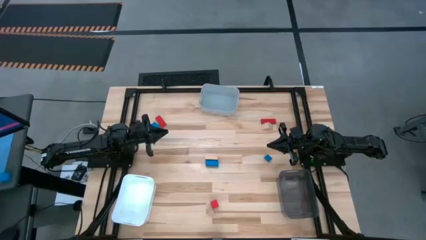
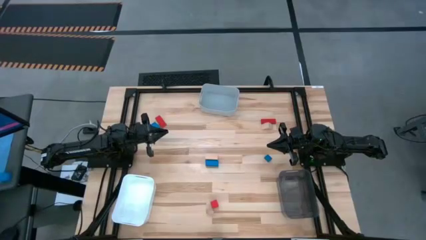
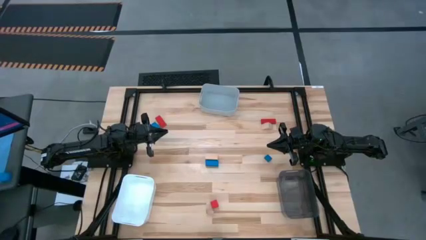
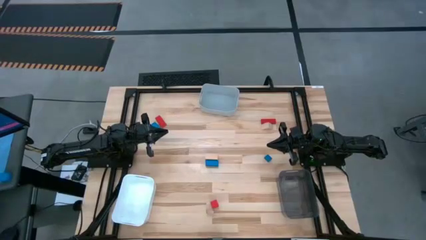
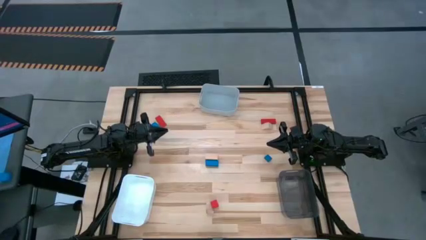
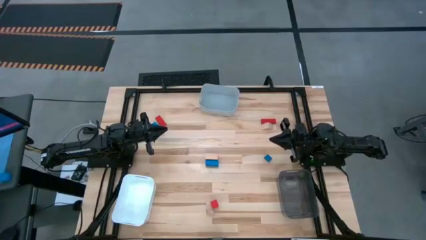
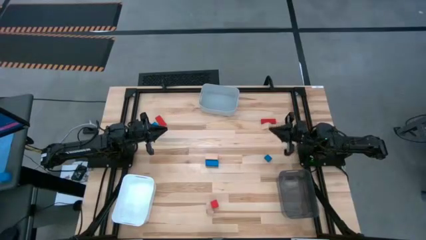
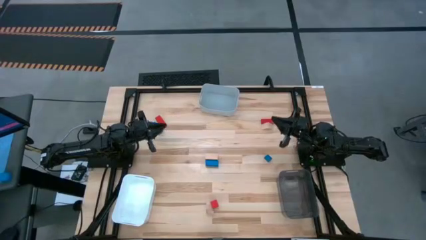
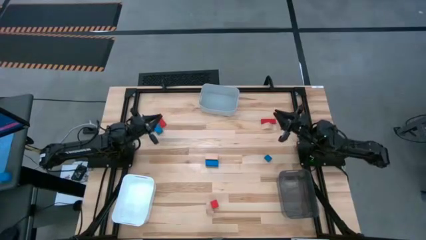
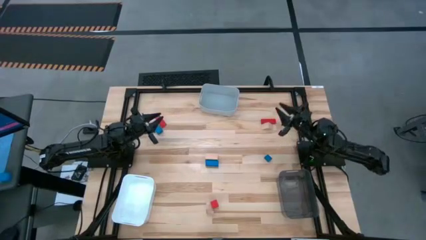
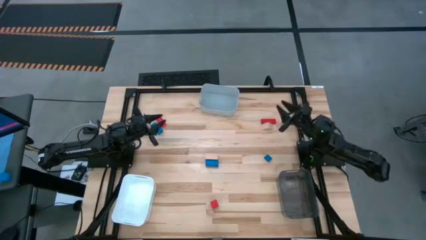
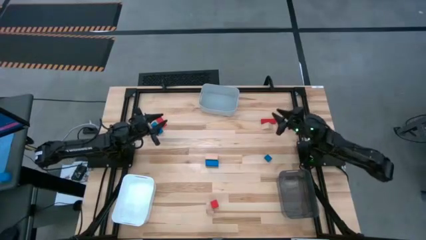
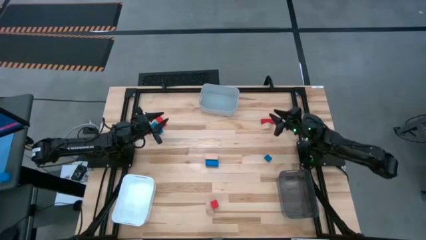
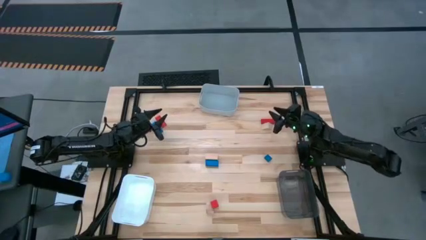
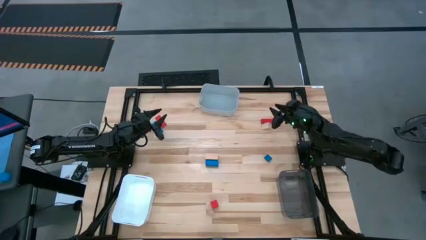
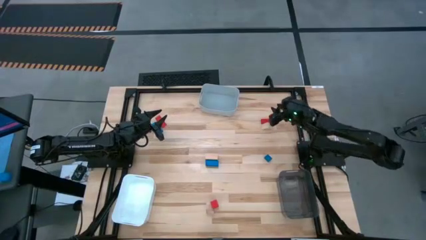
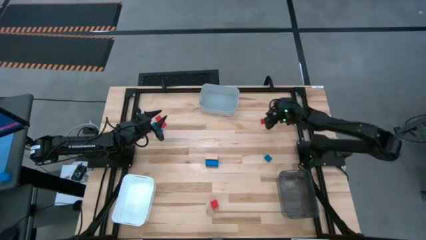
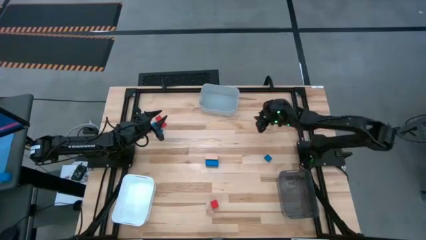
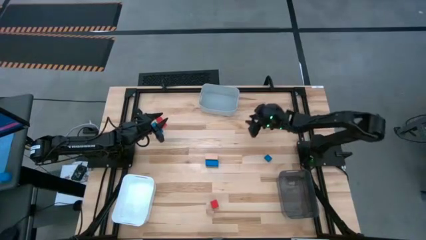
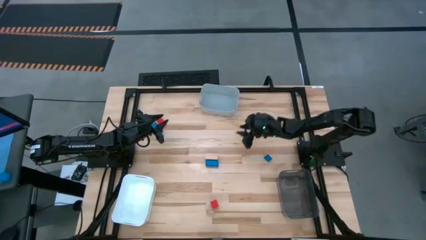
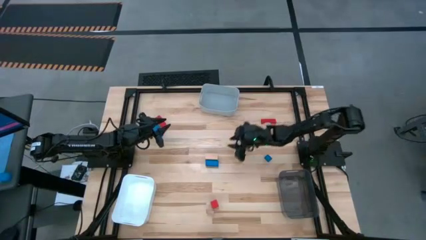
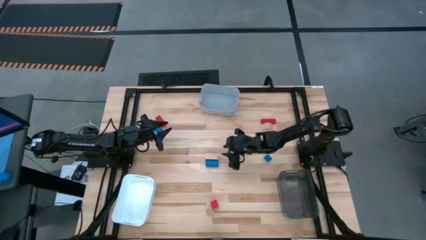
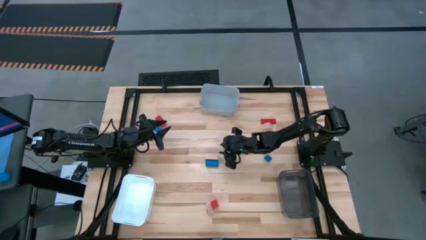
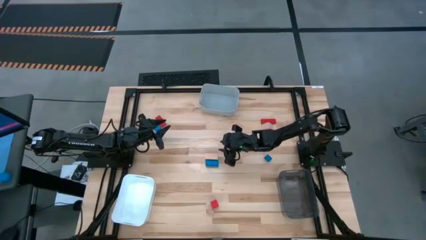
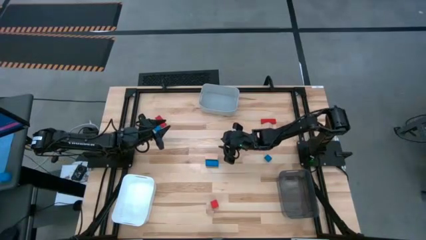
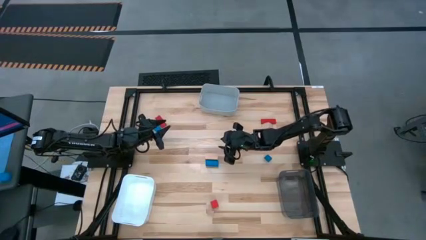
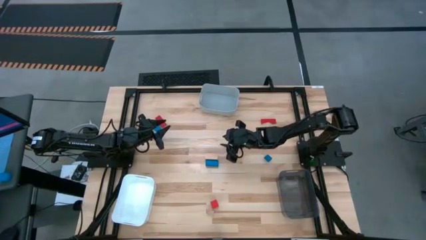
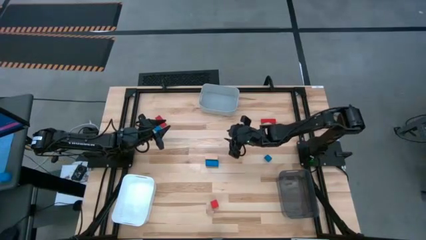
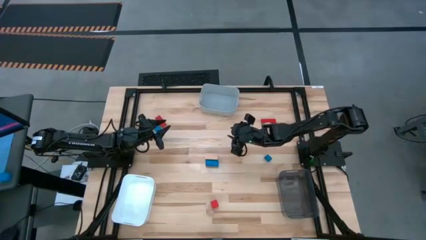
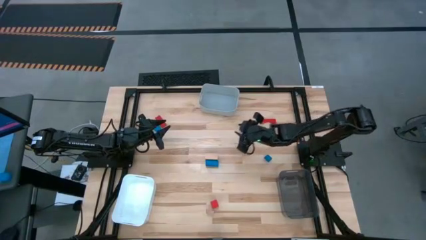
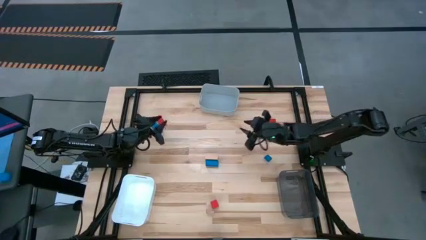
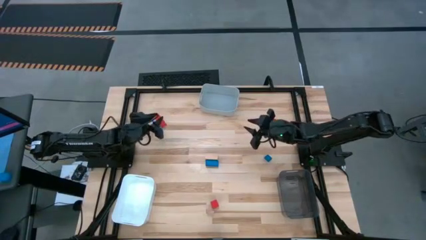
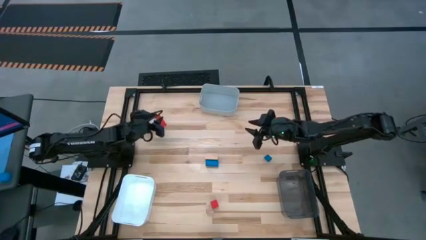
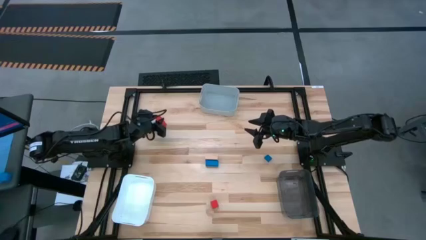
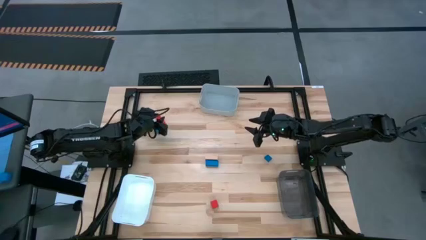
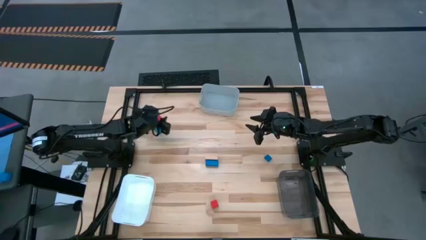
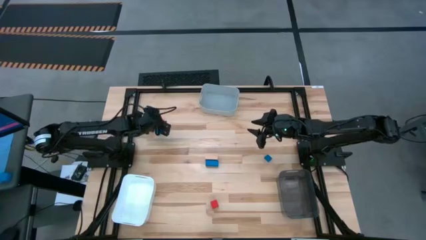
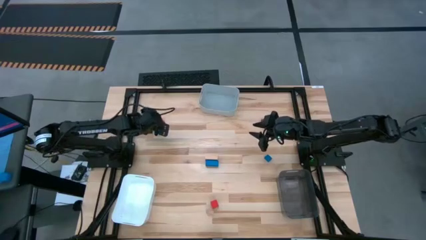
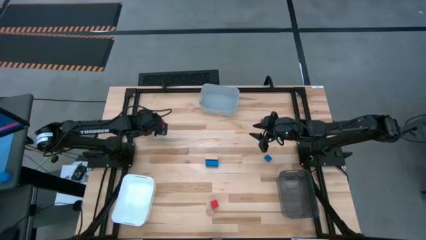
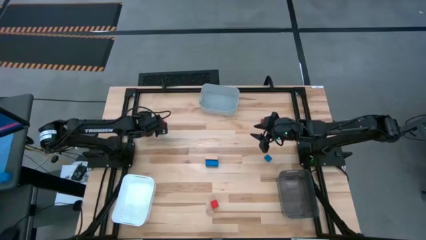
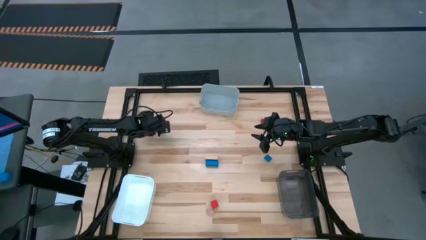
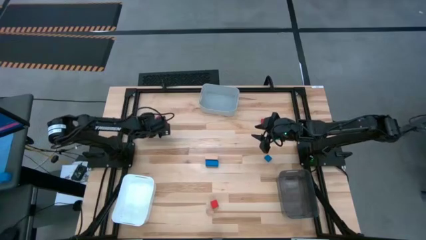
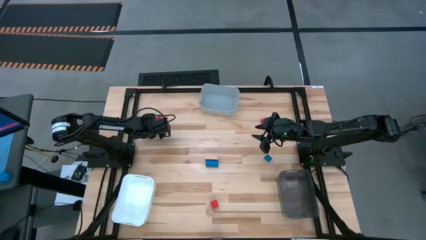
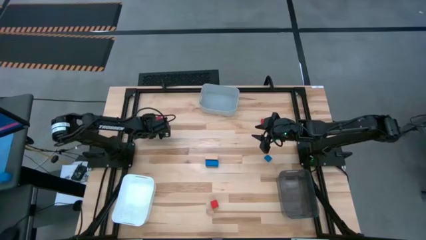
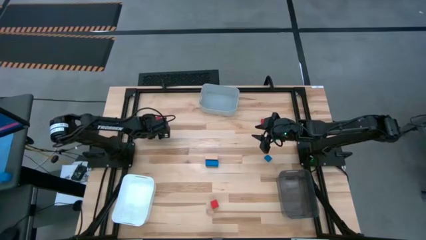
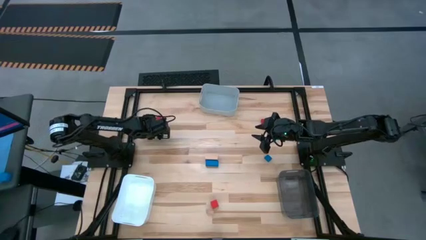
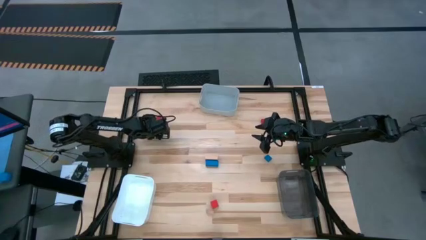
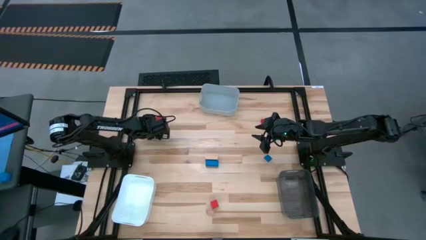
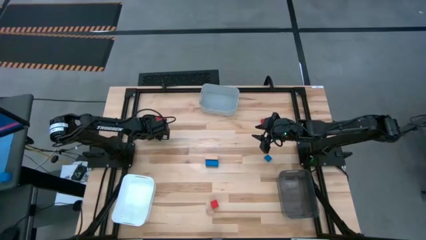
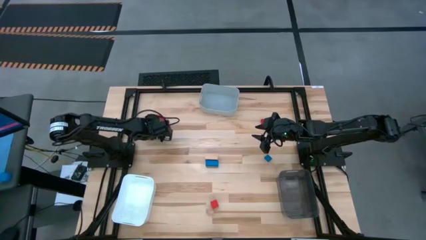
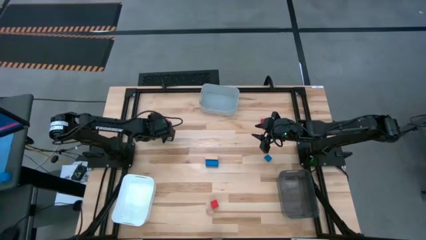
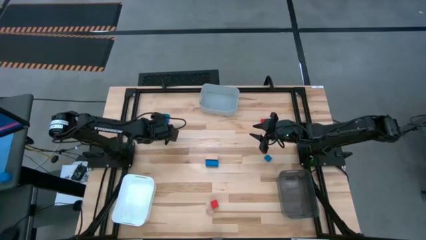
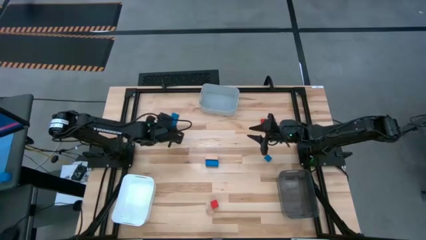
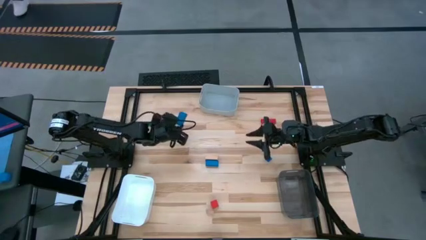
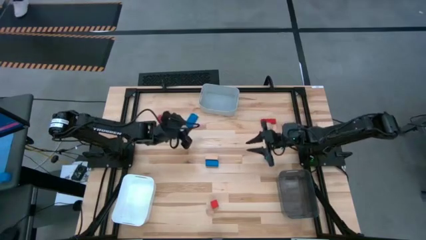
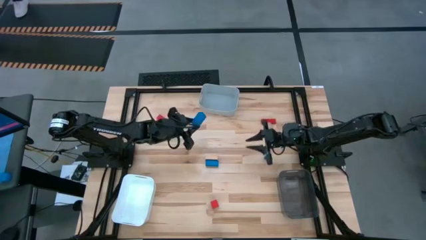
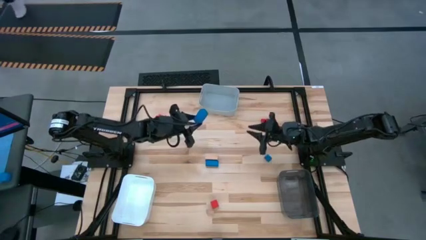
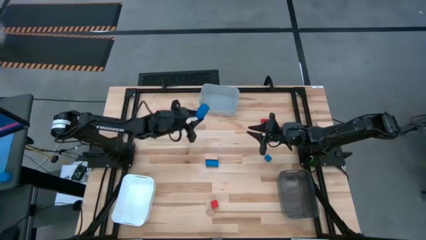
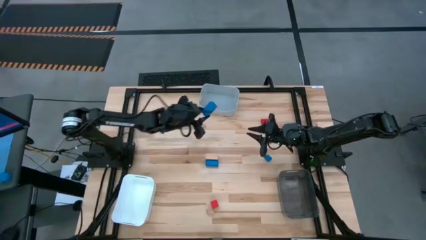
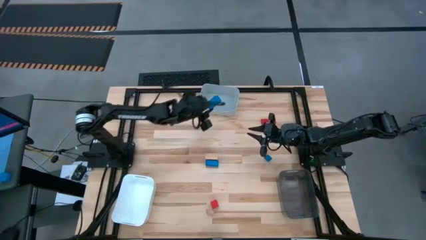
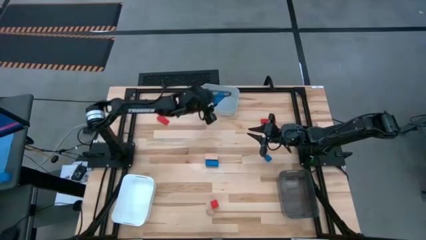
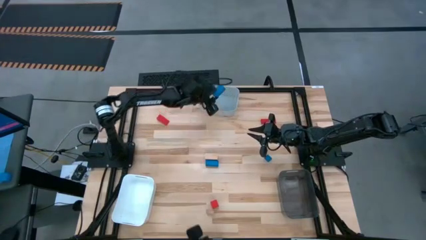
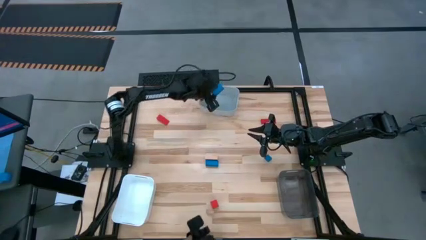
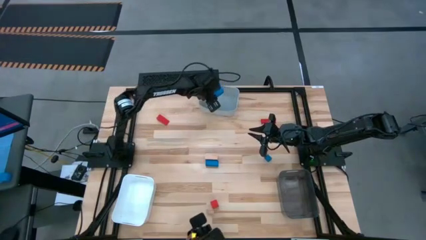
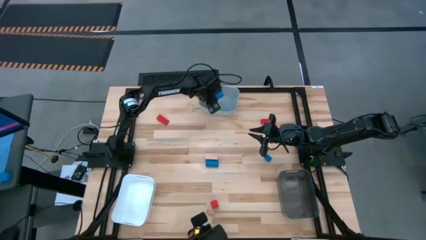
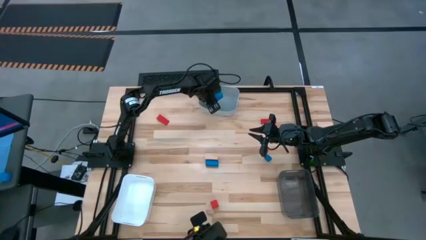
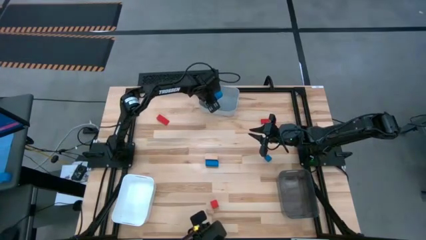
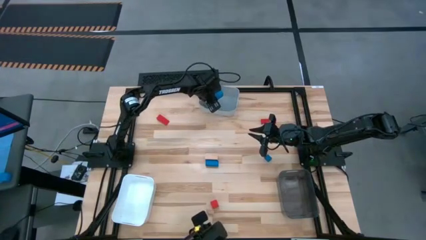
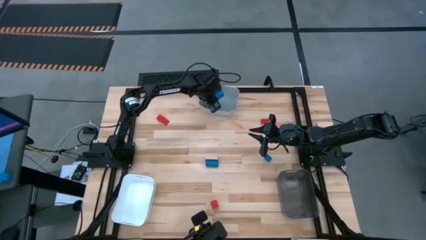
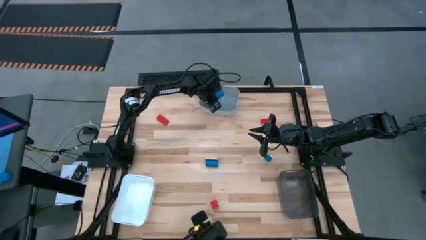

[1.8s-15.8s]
Task: Sort & place blocks by color
Put the blue rectangle block into the gray bin
